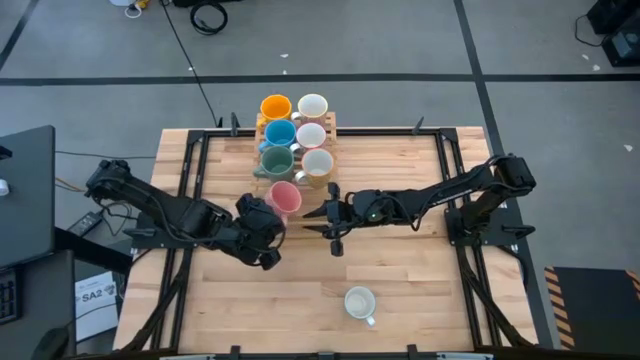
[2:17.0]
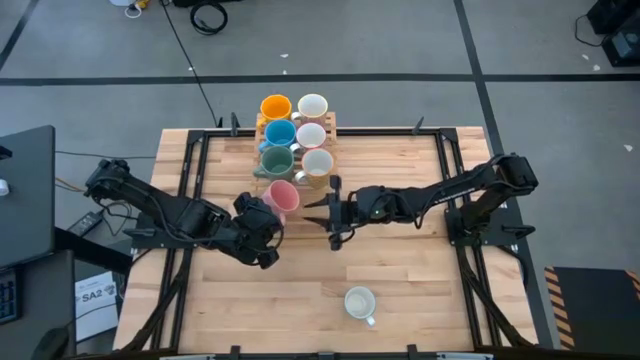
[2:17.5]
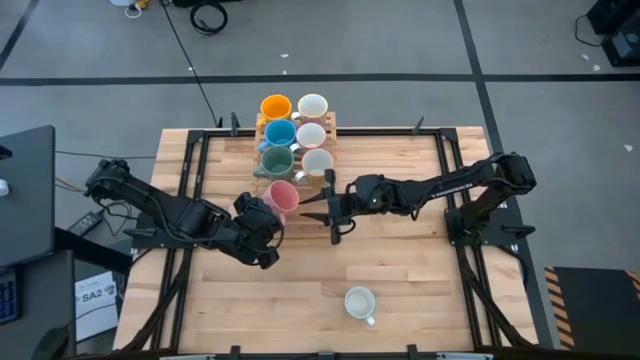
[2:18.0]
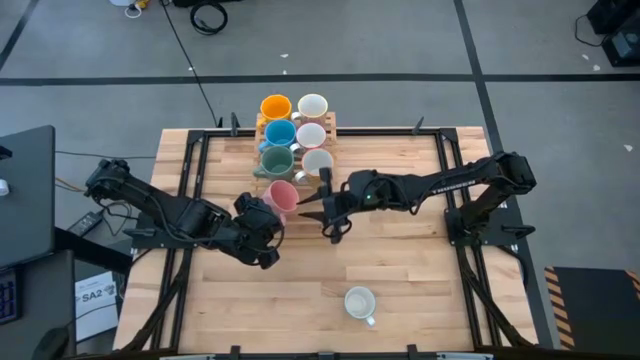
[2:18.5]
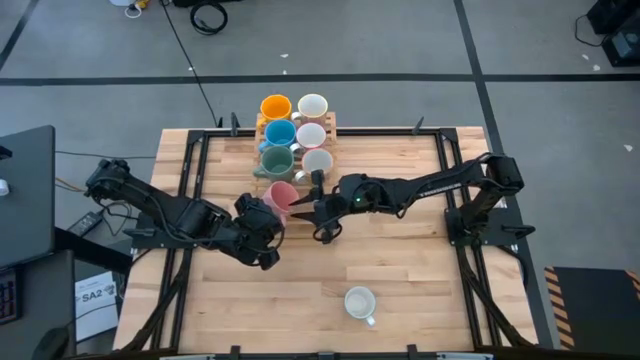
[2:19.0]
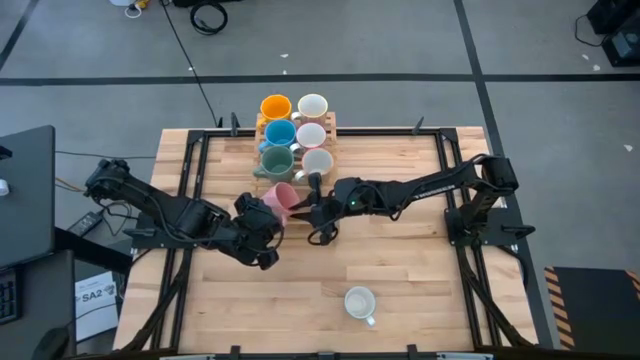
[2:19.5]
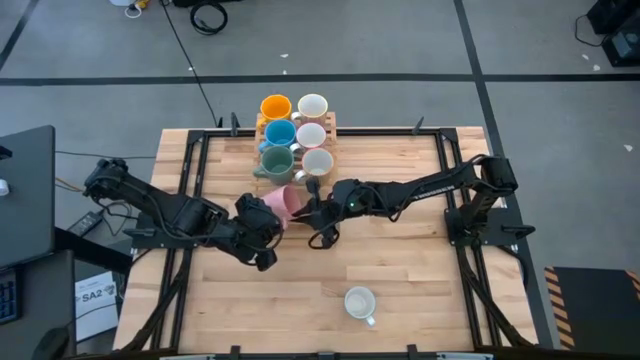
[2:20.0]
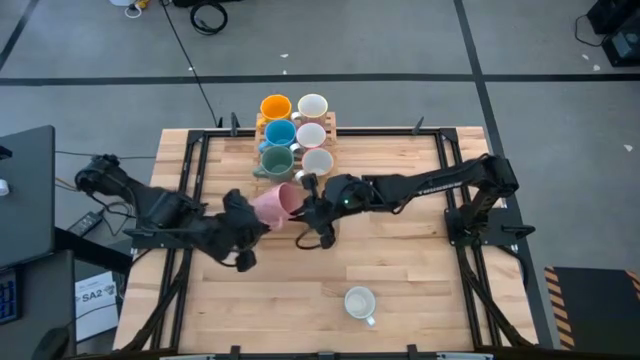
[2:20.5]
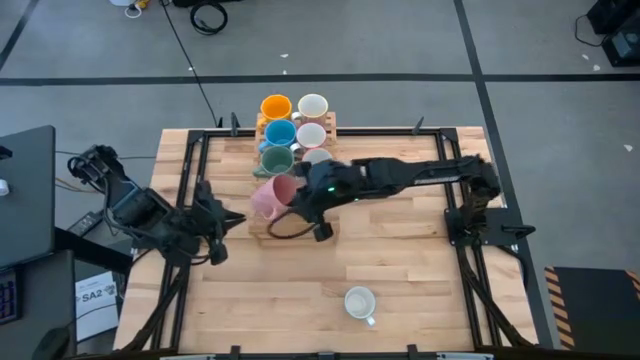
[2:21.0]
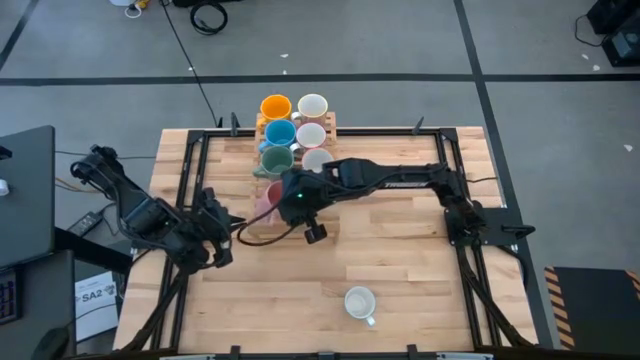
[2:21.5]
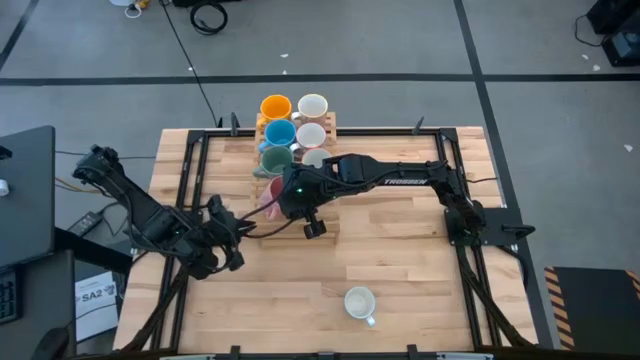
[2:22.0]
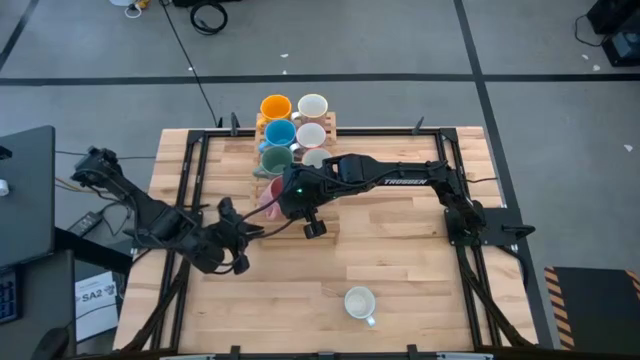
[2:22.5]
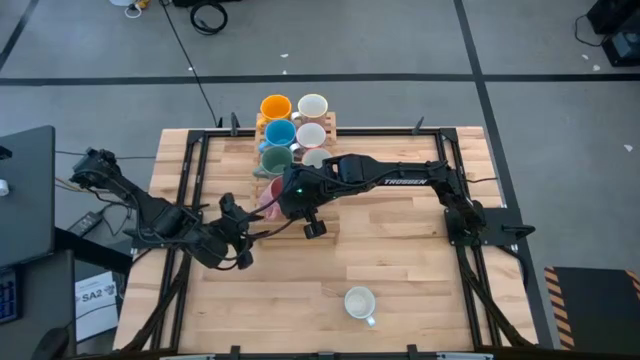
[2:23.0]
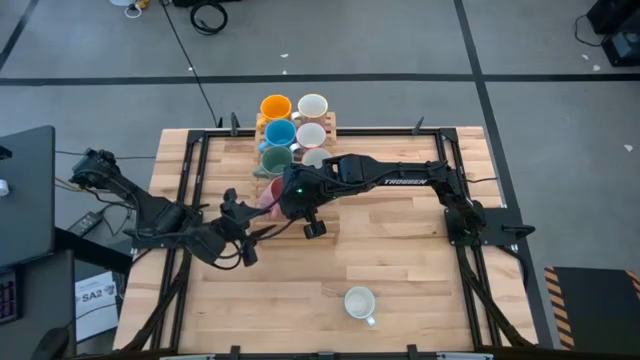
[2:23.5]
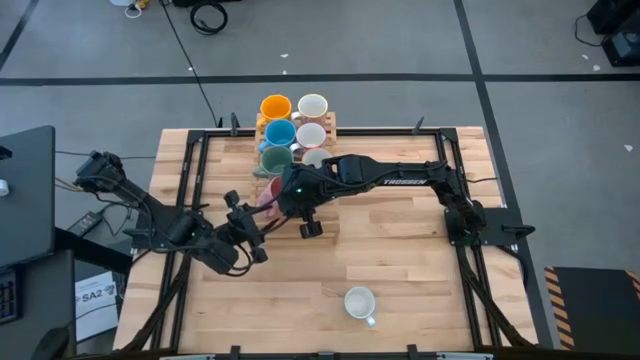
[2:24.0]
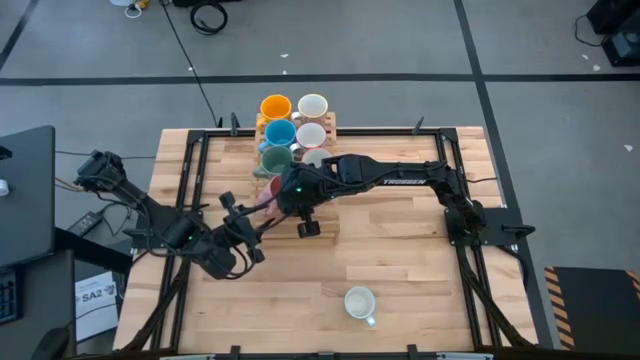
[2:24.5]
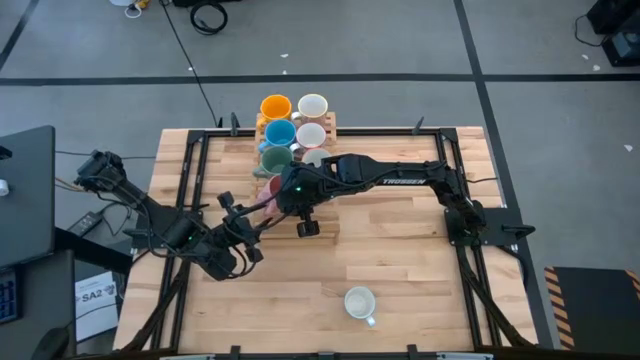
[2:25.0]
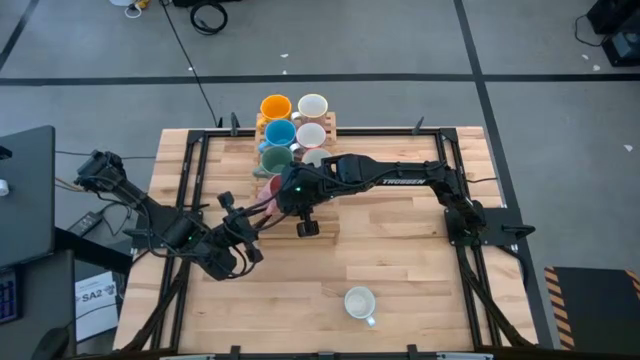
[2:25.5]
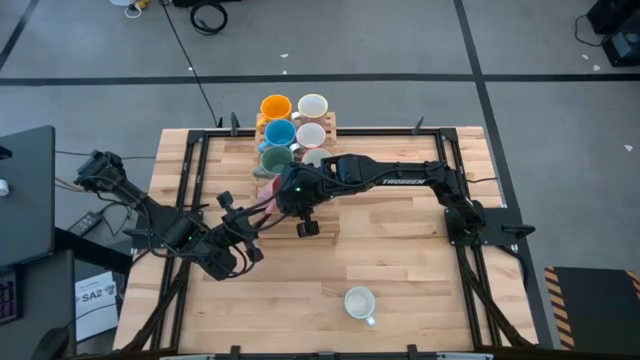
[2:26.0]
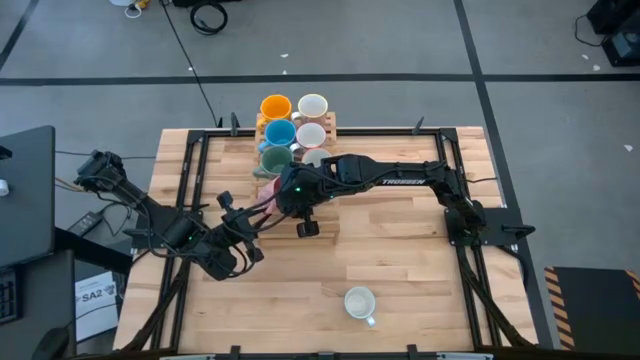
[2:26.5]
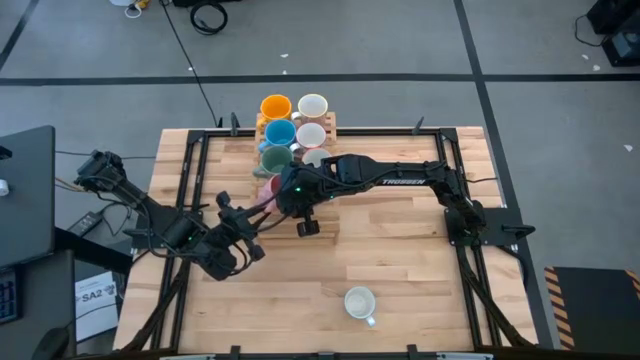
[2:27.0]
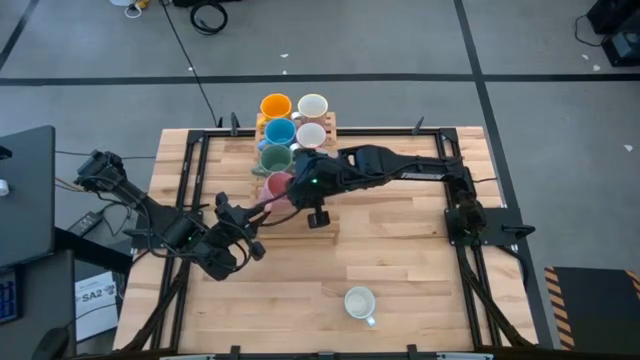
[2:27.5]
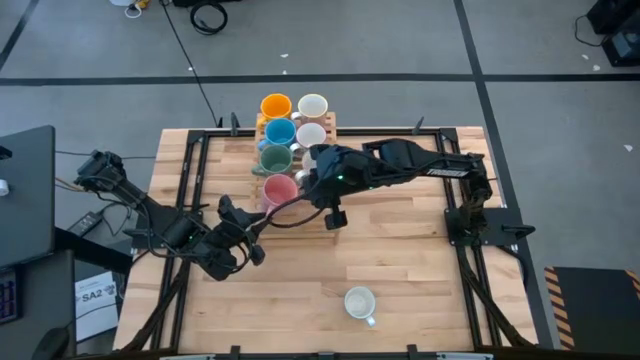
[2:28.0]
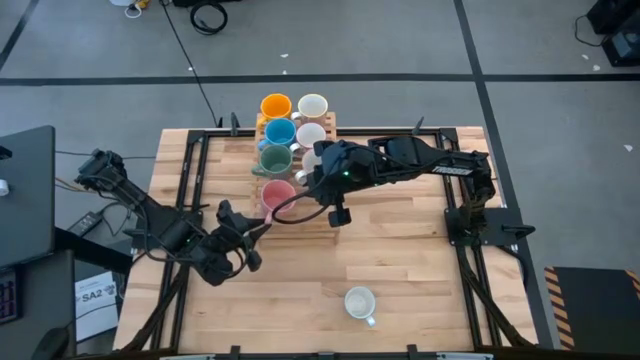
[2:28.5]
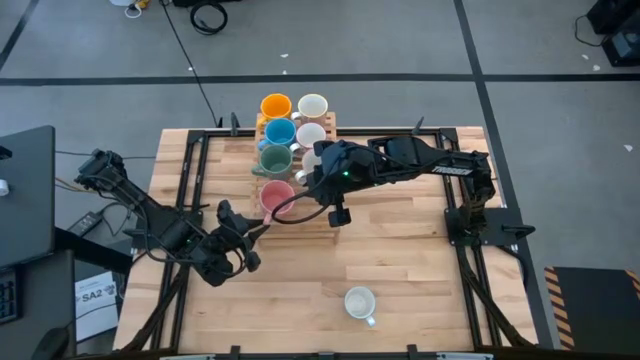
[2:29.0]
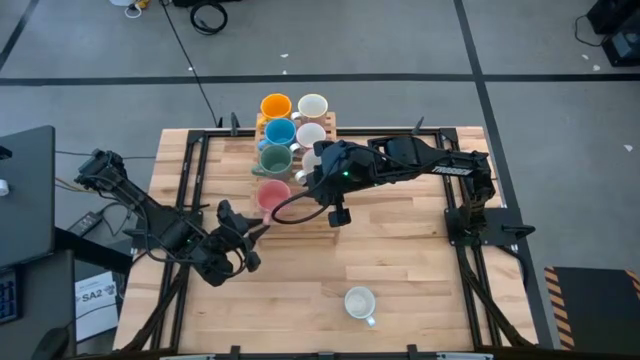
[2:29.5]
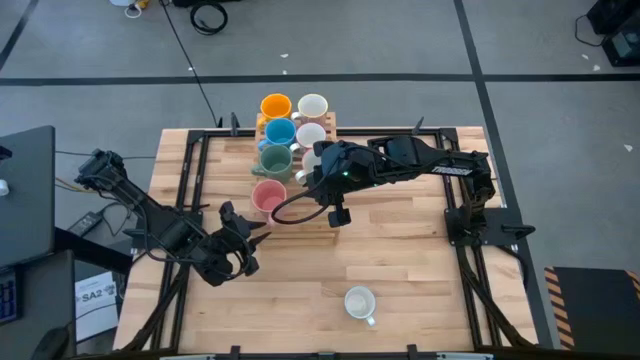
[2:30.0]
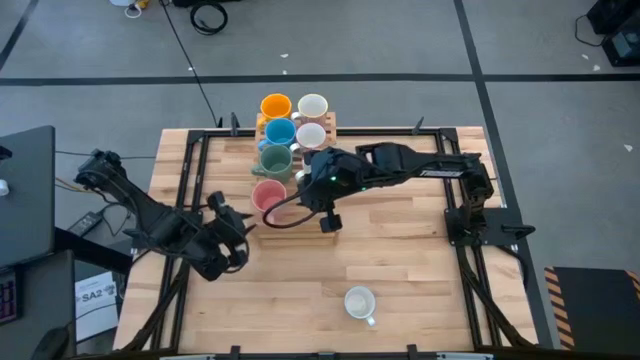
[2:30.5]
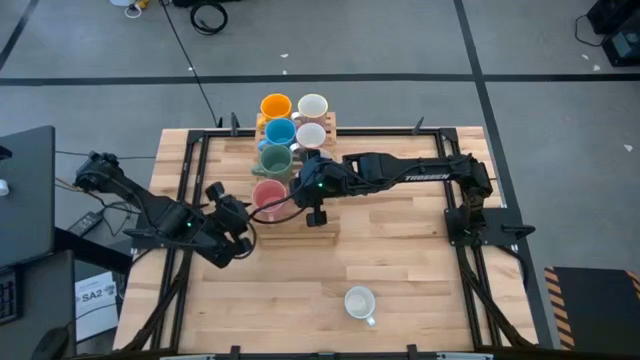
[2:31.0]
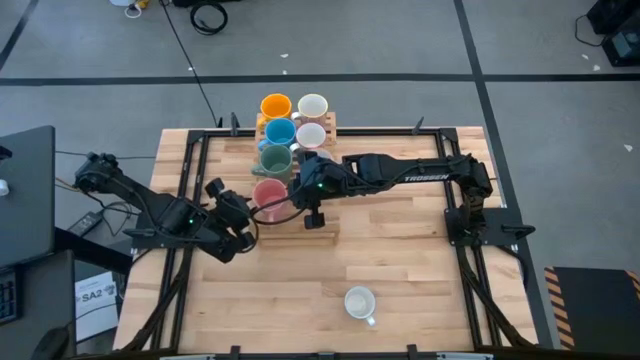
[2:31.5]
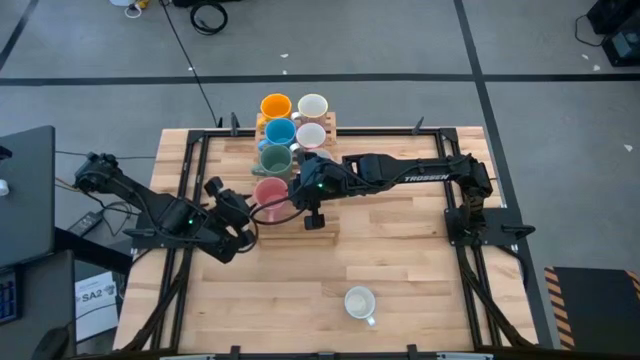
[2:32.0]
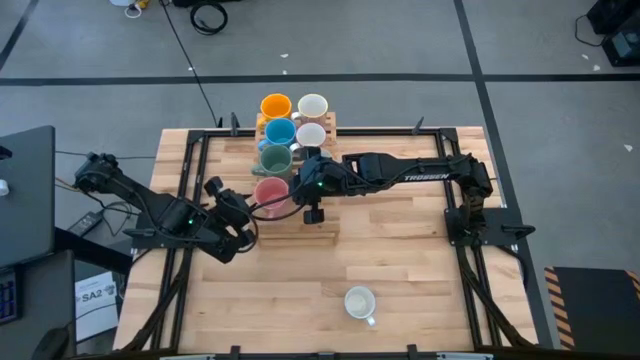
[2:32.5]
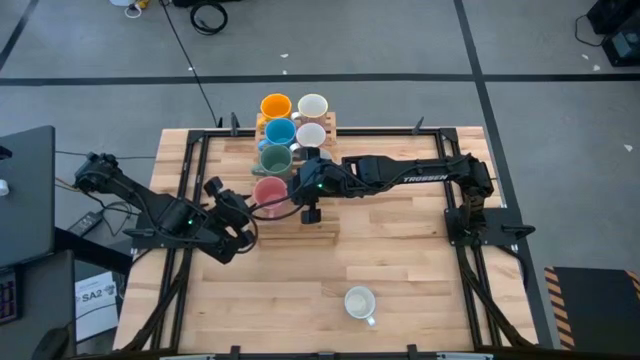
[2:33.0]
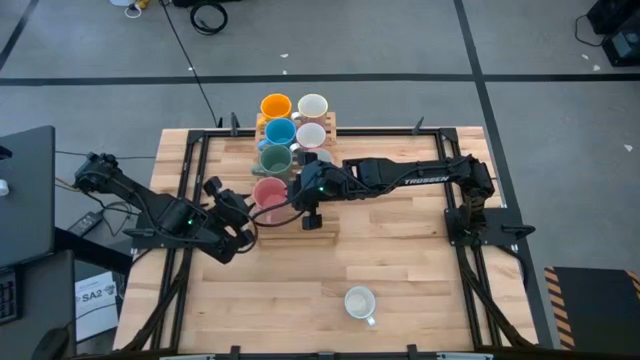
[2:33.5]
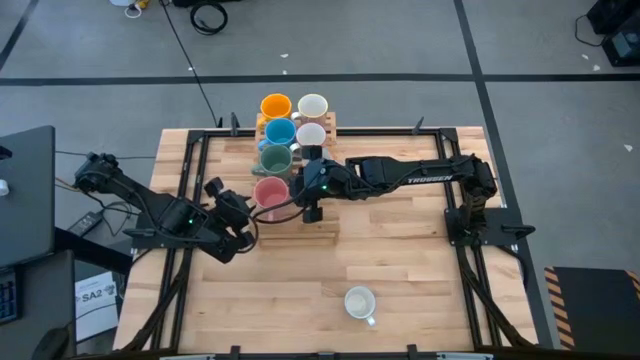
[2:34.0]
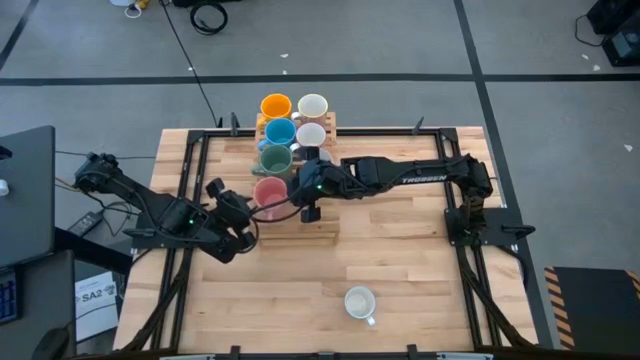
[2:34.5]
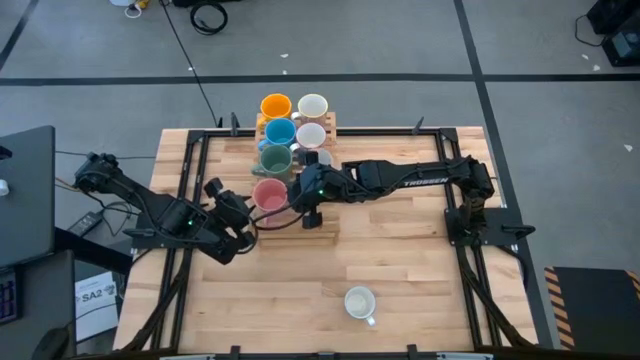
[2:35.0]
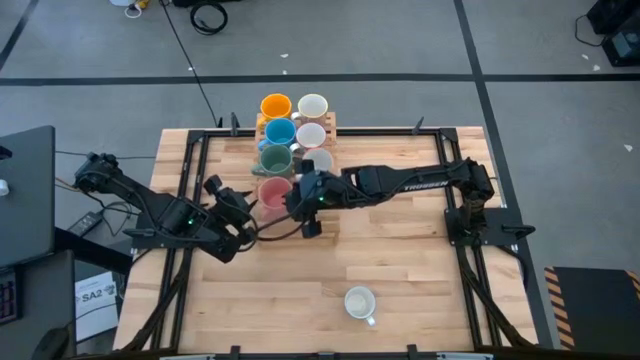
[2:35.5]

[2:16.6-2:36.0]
Task: Place coffee mugs
Put the pink mug on the shelf

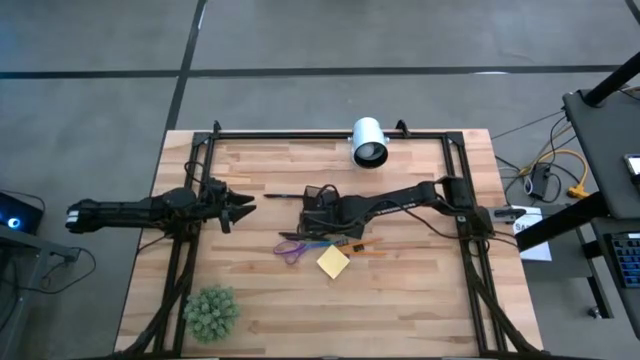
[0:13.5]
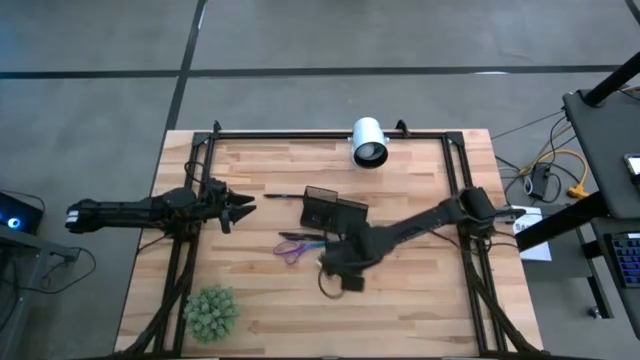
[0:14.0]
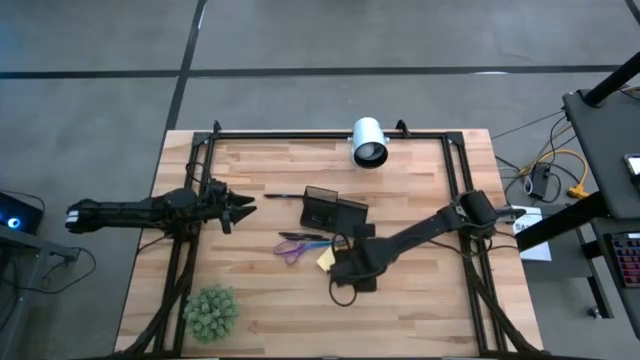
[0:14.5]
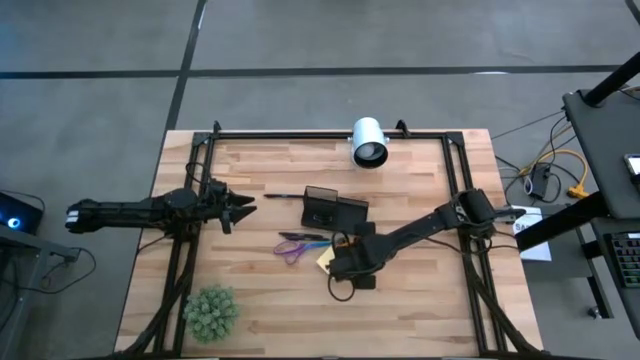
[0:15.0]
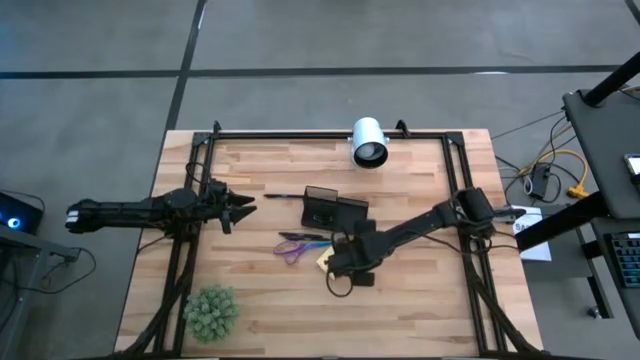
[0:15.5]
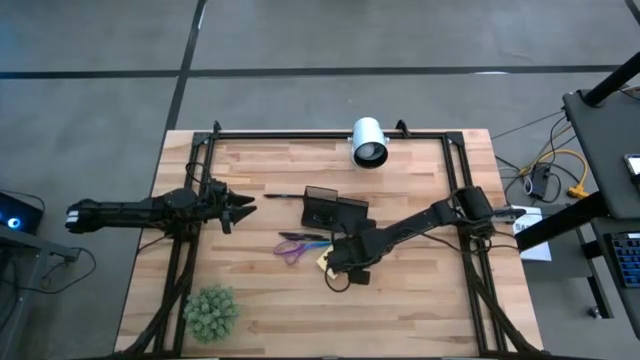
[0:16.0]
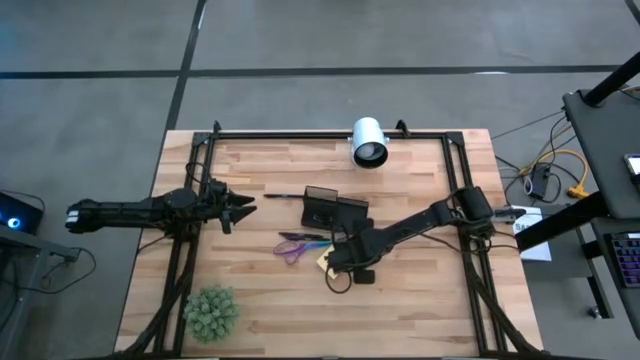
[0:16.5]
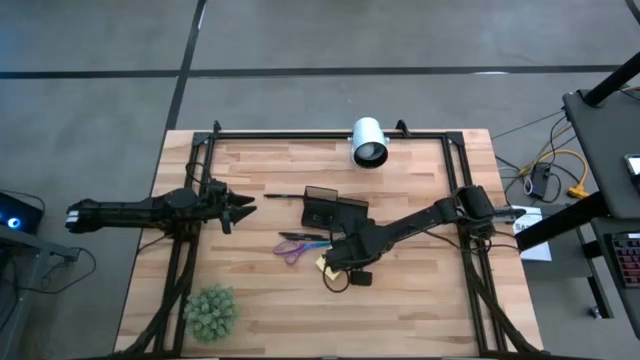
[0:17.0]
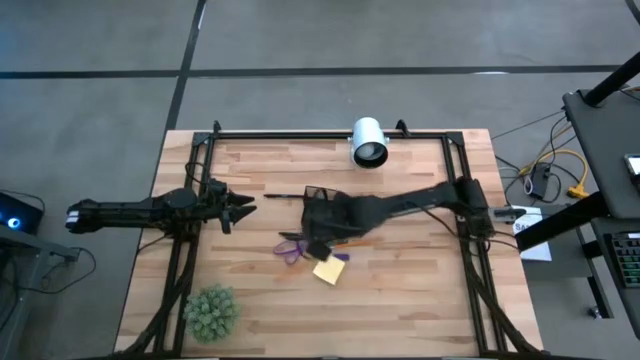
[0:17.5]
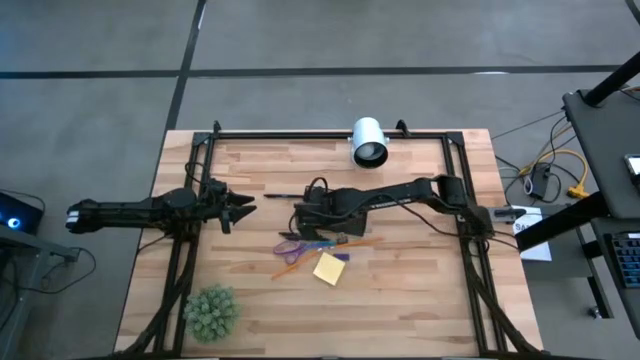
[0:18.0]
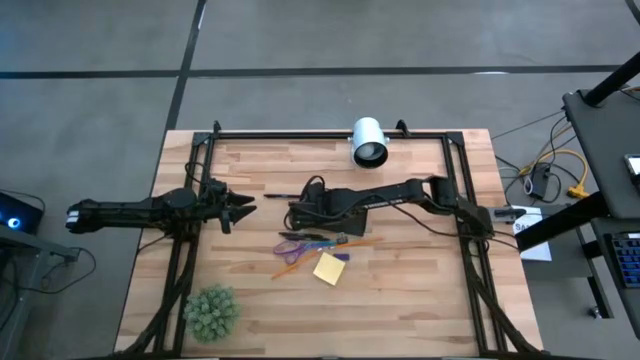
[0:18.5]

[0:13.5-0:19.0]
Task: Pick and place office supplies into organizer
Put the right black binder clip into the black mesh organizer
